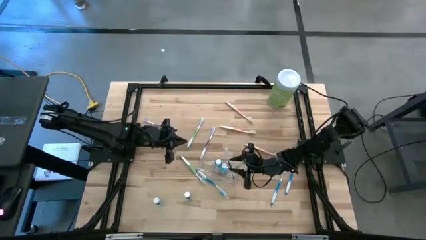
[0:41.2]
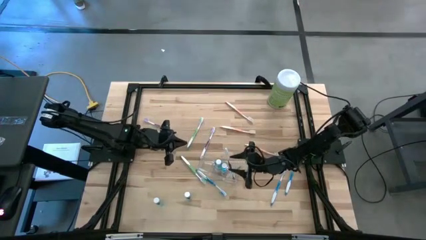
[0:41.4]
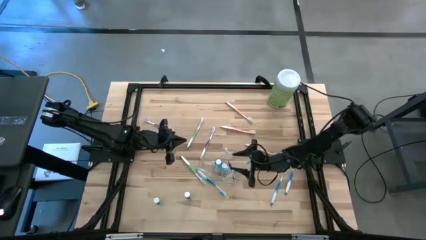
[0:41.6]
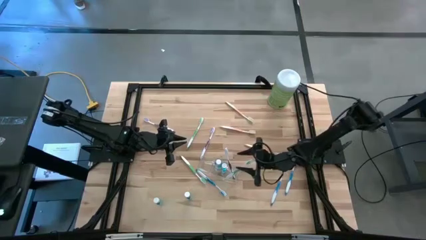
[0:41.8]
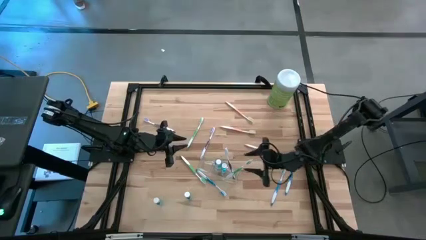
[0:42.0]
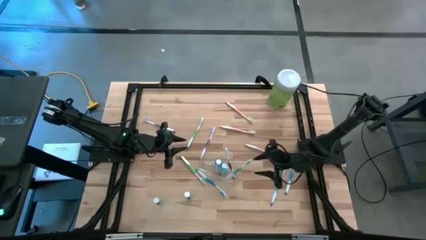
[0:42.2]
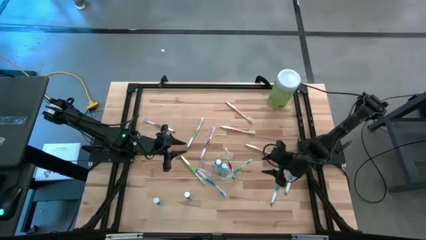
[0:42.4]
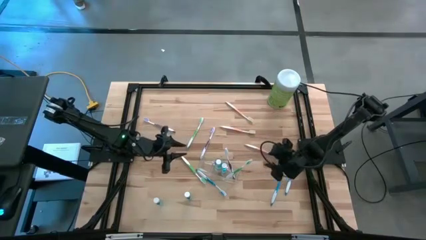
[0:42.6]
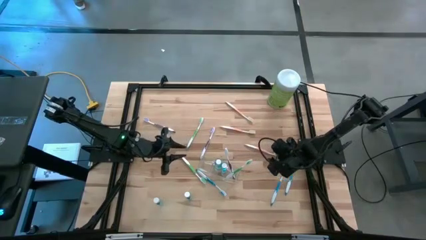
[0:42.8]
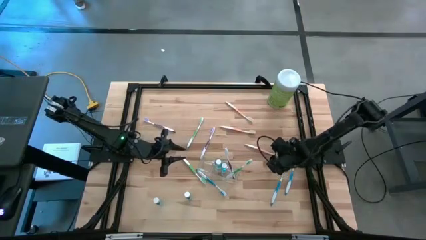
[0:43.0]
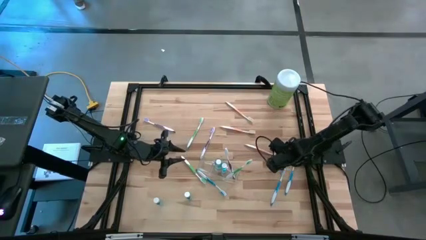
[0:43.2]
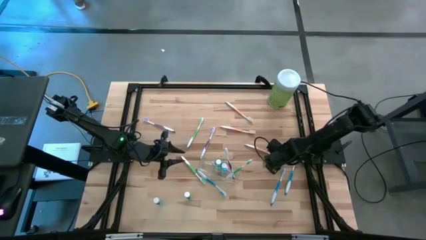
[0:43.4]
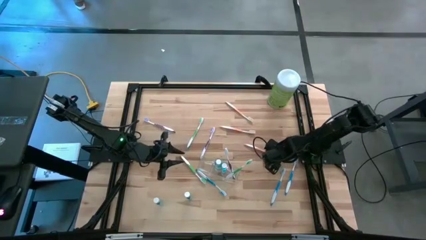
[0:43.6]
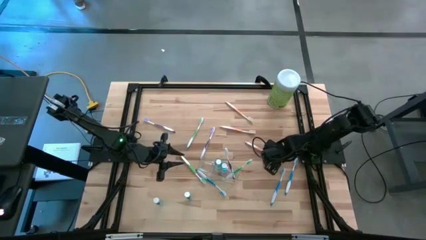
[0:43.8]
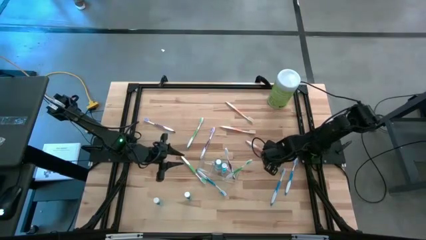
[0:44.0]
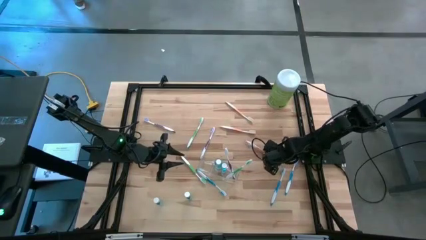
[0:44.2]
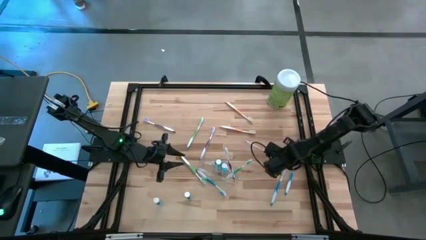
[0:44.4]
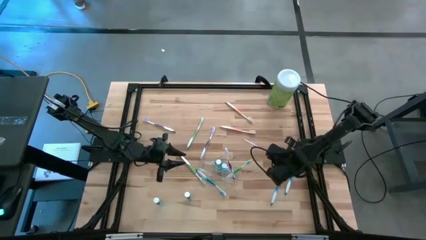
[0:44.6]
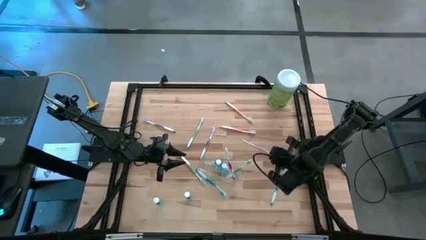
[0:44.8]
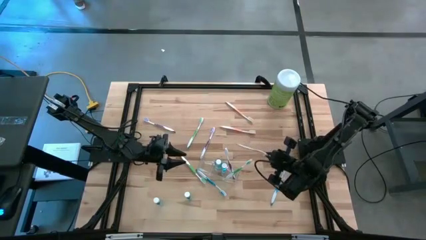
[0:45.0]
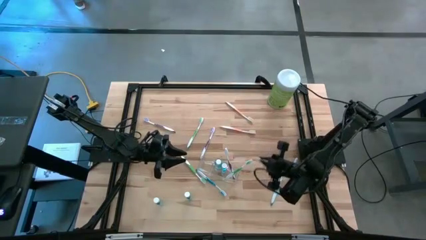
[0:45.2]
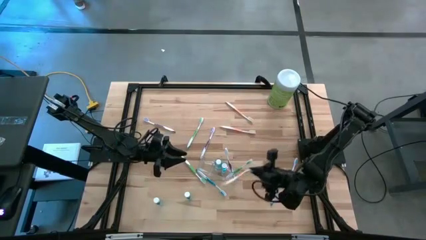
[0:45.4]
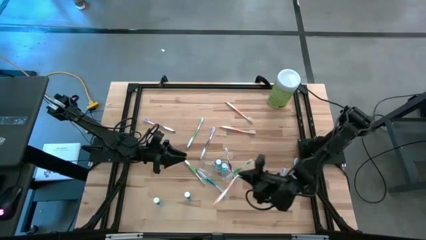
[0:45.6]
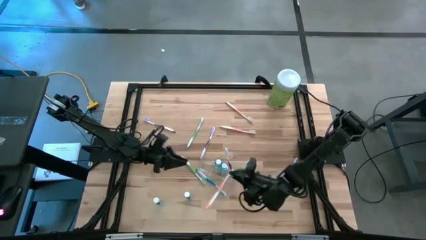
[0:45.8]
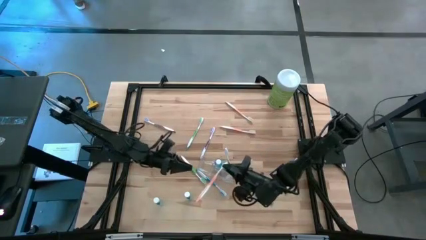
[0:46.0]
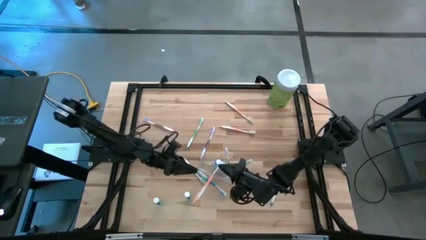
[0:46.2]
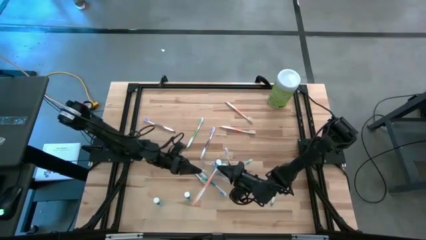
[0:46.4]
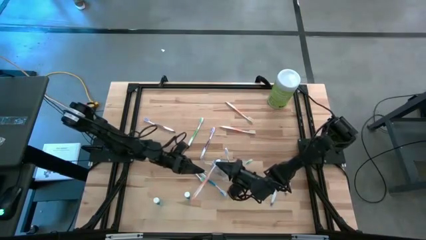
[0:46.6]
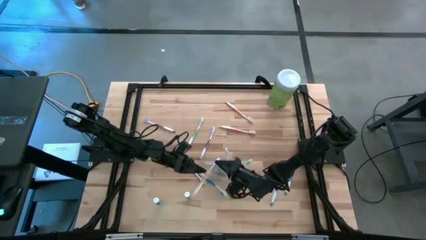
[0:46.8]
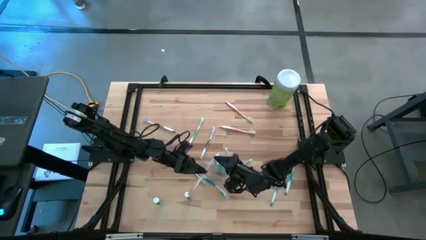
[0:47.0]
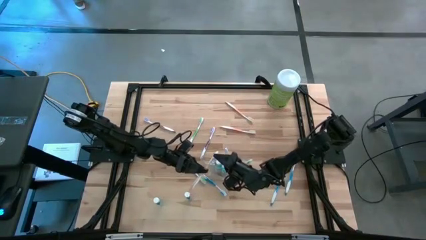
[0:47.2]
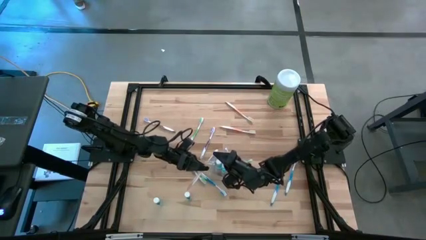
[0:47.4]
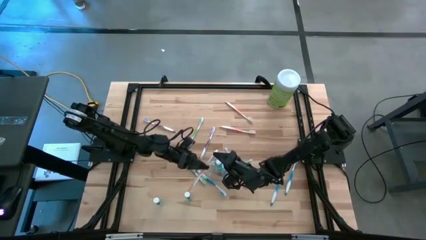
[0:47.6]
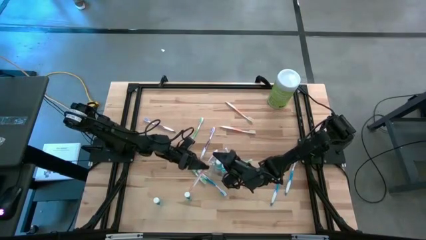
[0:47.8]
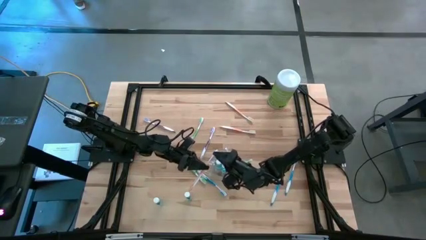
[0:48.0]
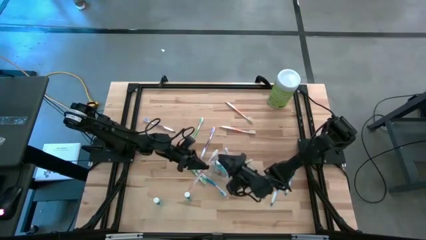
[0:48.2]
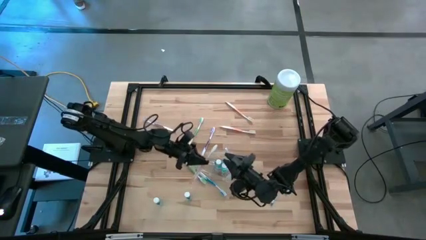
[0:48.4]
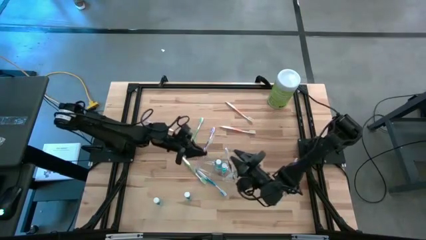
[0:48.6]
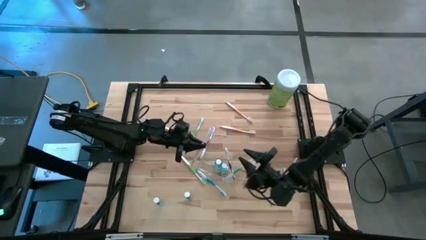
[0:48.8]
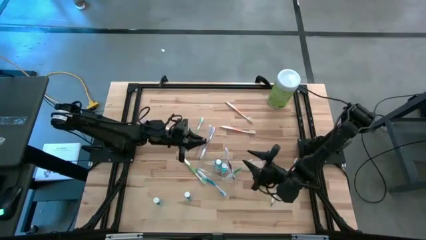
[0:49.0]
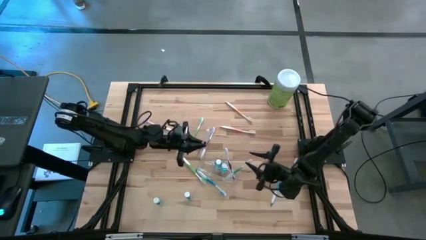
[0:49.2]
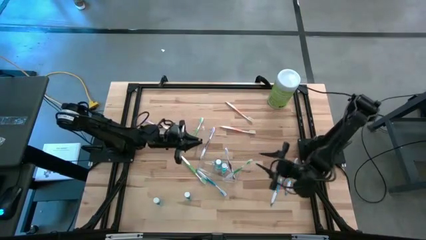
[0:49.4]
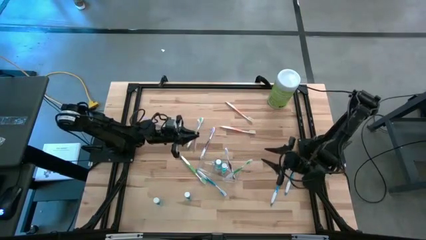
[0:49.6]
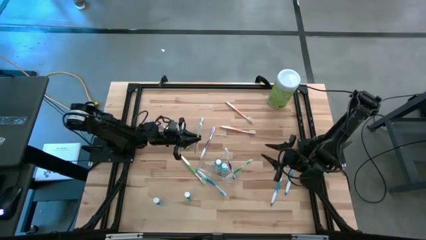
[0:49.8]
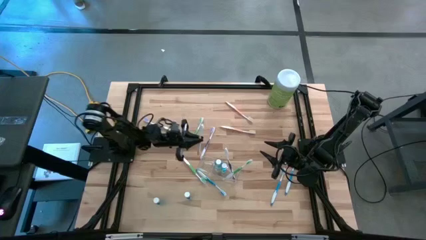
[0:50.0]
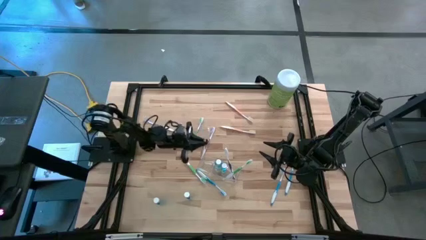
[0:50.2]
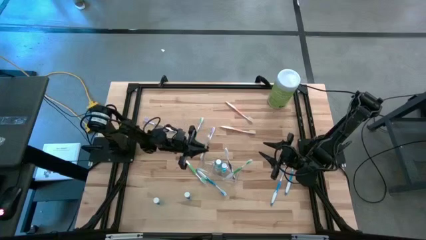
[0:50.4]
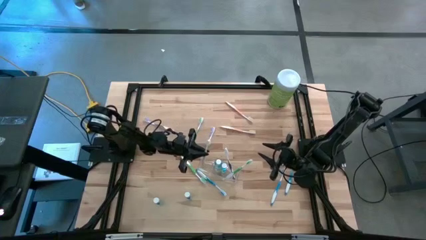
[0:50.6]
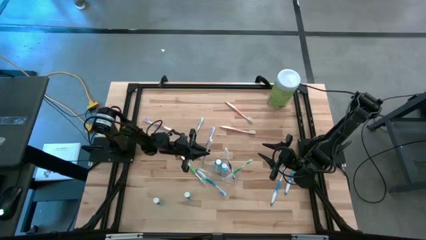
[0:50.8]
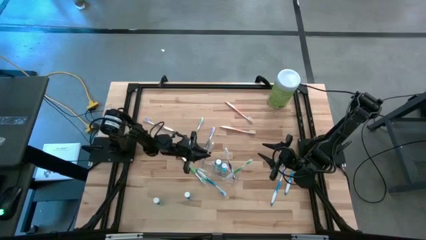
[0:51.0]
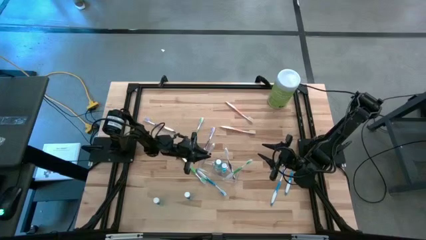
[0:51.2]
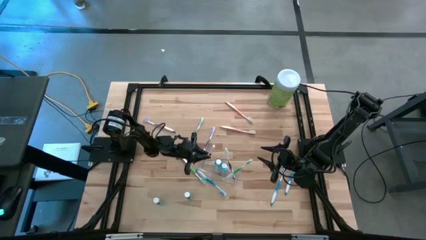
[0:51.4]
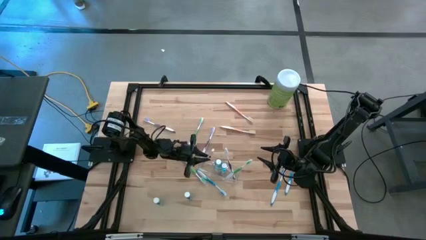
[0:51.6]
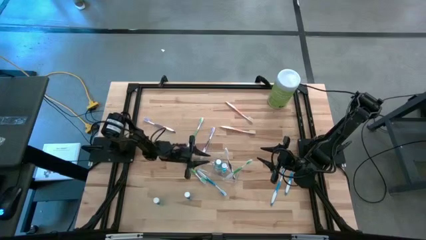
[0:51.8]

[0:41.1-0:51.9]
Task: Pick & Place toothbrushing station
Put the orange toothbrush into the transparent organizer

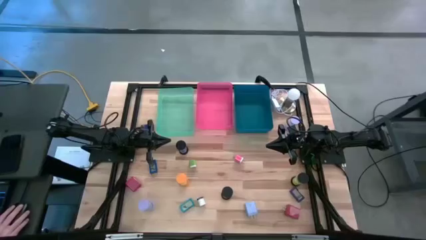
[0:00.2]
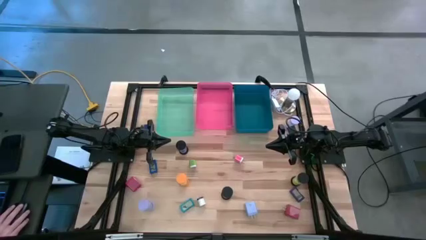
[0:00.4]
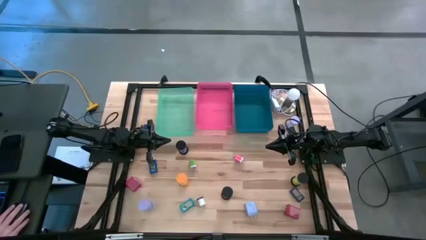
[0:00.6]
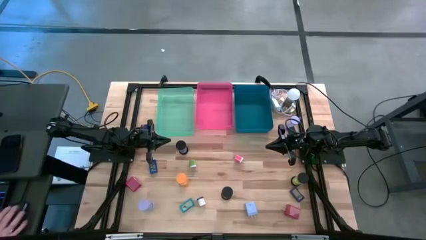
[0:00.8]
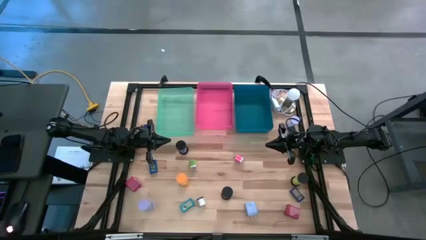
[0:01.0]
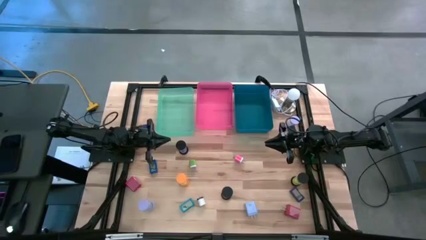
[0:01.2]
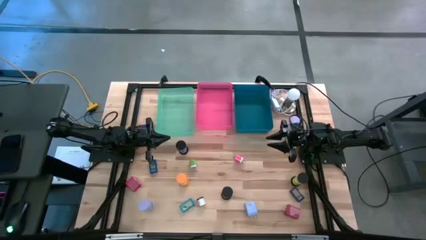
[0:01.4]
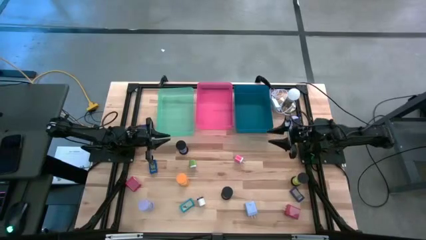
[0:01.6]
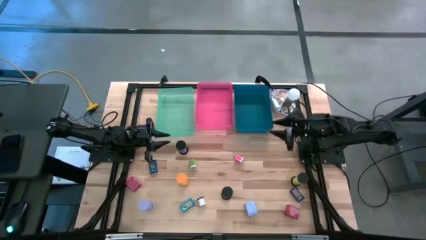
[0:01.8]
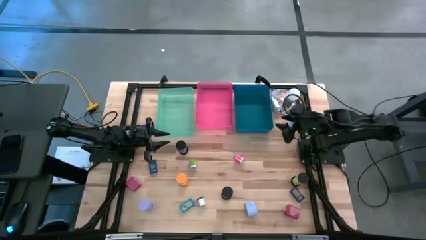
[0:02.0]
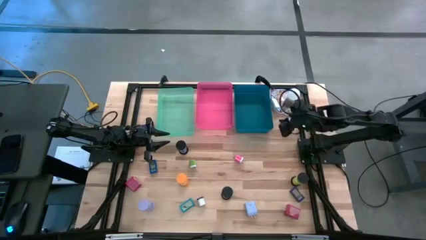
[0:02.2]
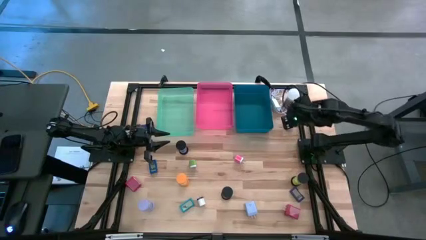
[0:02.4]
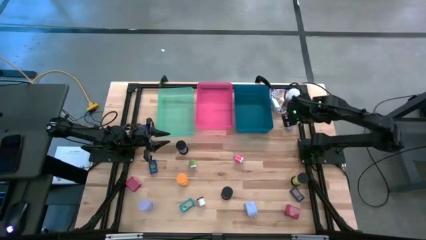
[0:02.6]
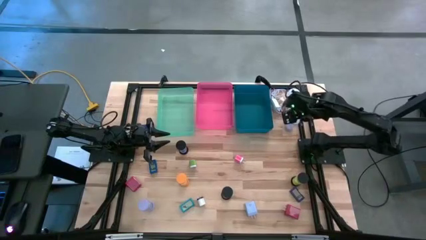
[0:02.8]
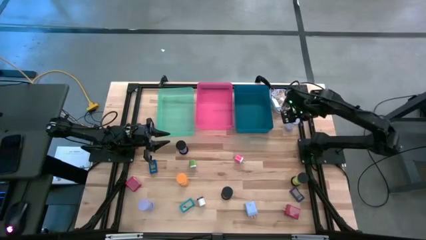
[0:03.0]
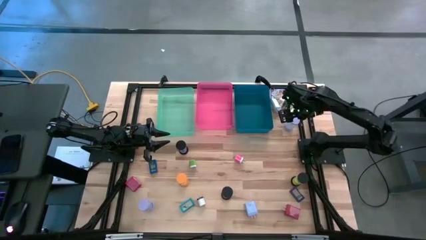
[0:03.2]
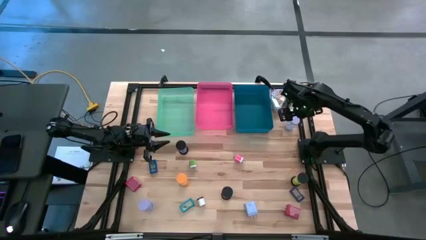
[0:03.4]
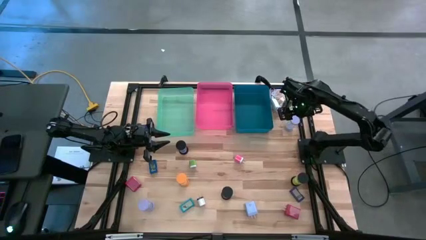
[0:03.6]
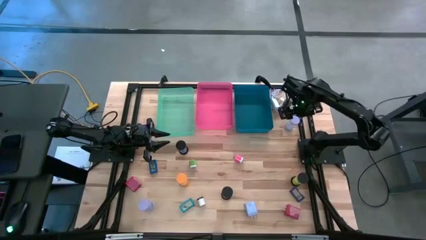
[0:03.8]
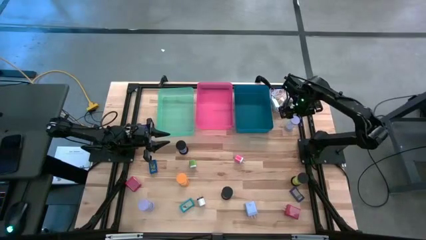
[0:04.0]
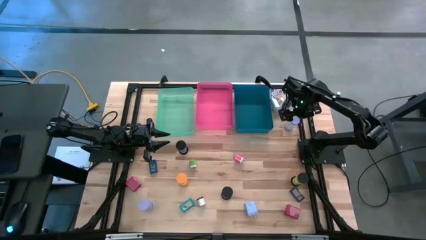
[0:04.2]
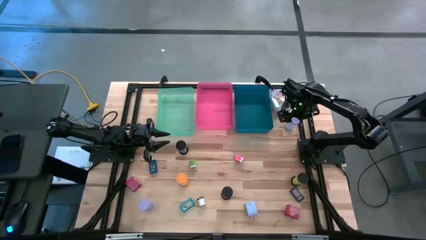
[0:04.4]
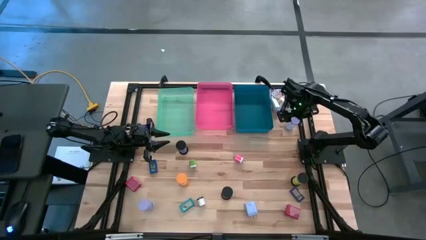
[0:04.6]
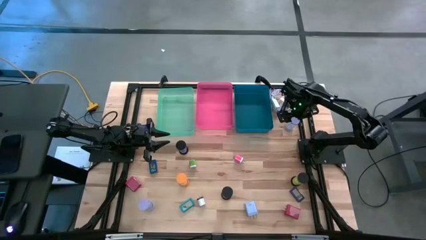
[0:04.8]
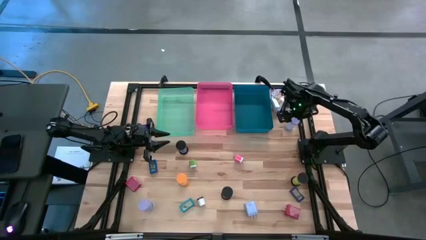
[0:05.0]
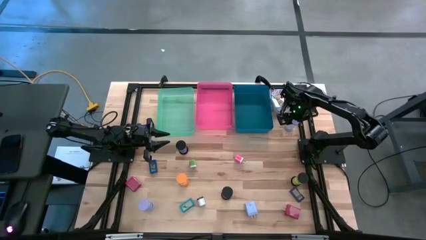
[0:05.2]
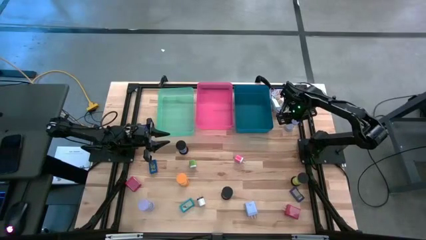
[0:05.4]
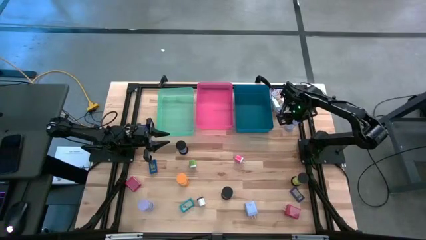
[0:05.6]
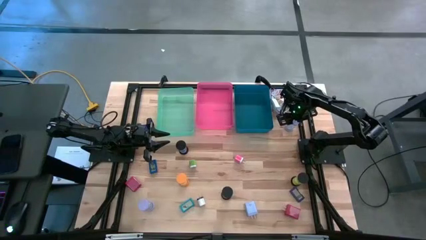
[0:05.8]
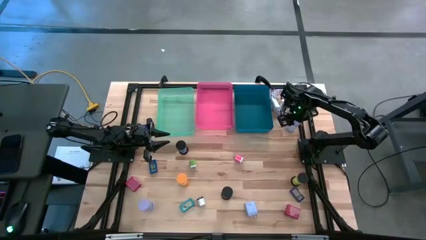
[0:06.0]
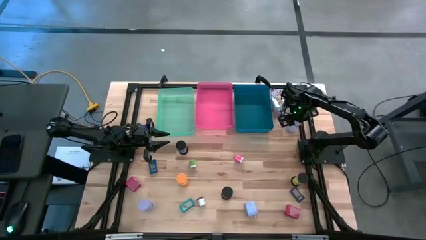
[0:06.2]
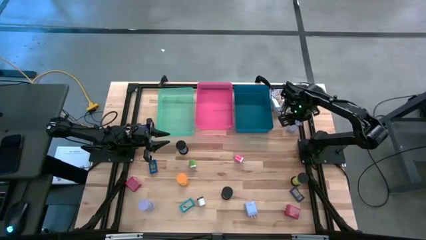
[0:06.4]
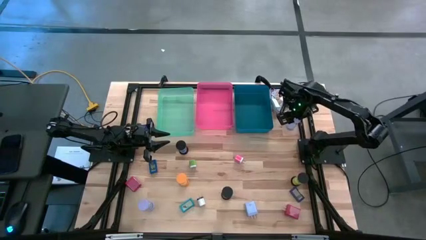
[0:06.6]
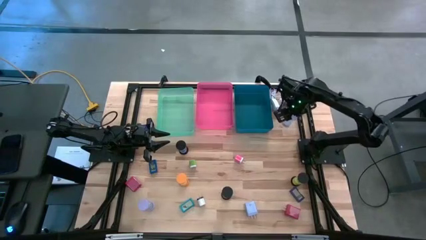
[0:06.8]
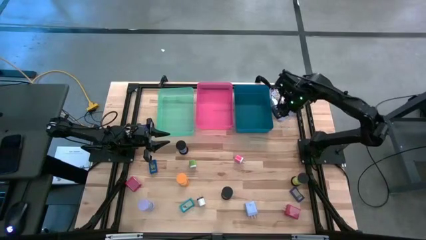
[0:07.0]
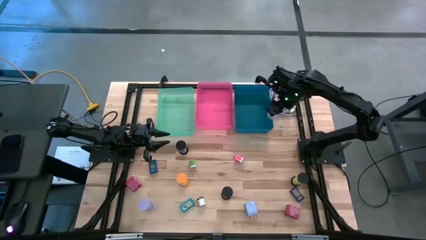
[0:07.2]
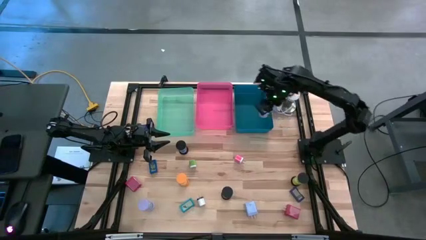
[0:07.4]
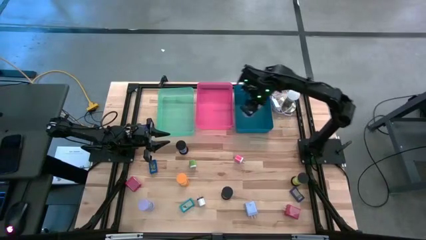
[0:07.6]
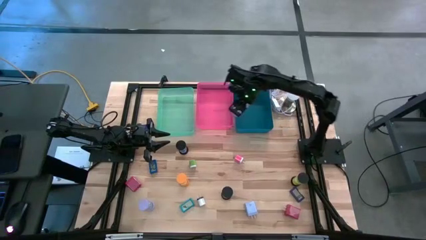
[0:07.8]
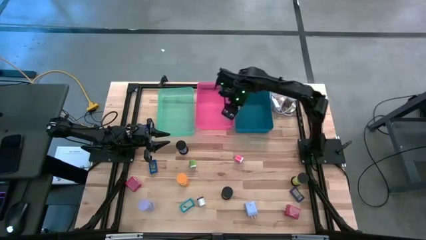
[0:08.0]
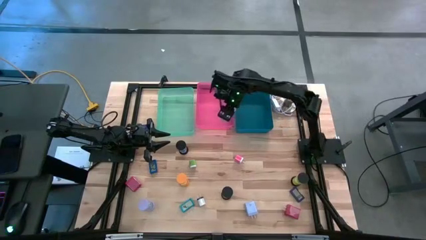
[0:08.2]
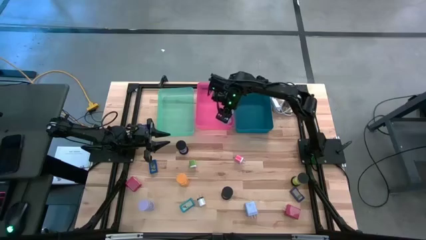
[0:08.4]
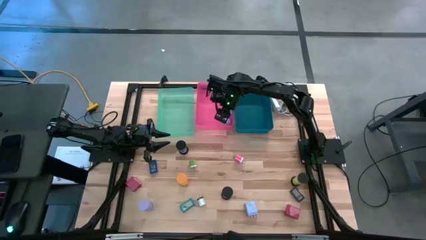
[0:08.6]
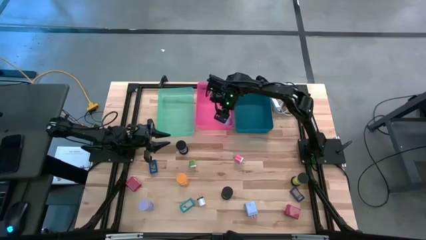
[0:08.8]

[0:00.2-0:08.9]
Task: Pick & Place Office items
Put the top violet hourglass into the pink bin
